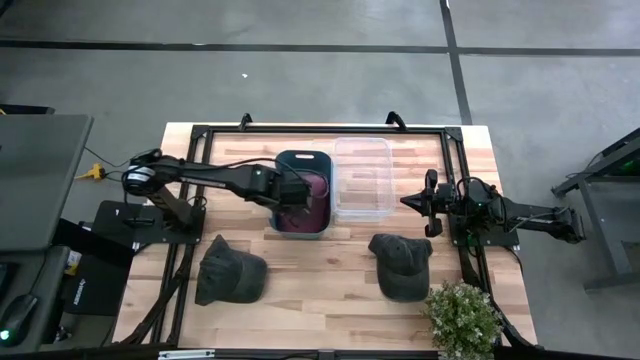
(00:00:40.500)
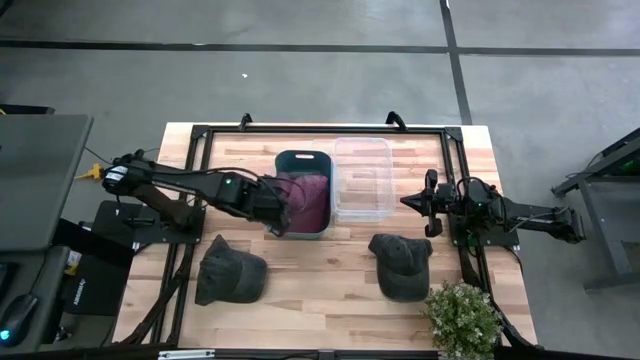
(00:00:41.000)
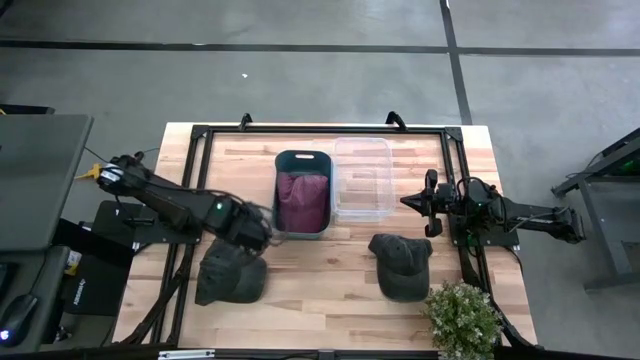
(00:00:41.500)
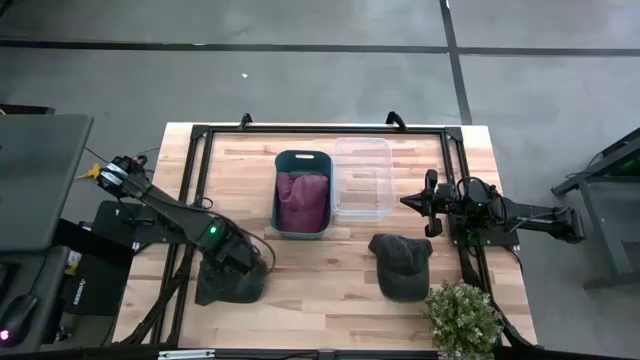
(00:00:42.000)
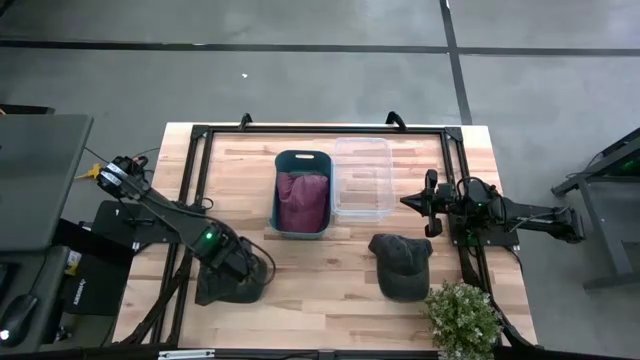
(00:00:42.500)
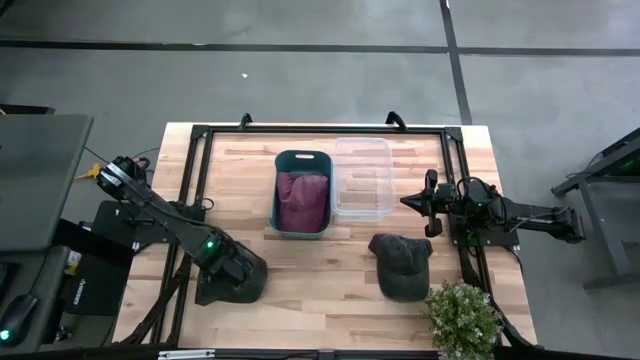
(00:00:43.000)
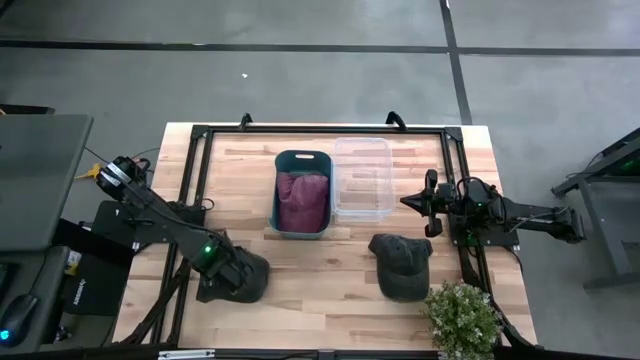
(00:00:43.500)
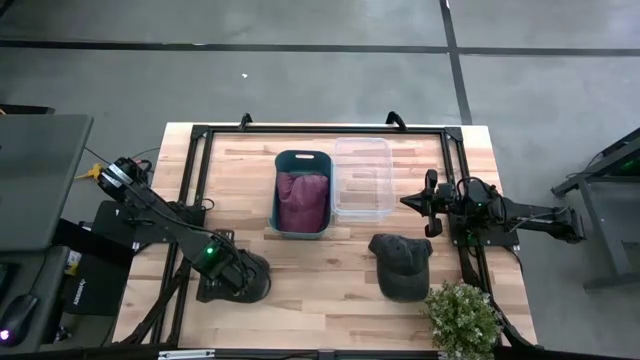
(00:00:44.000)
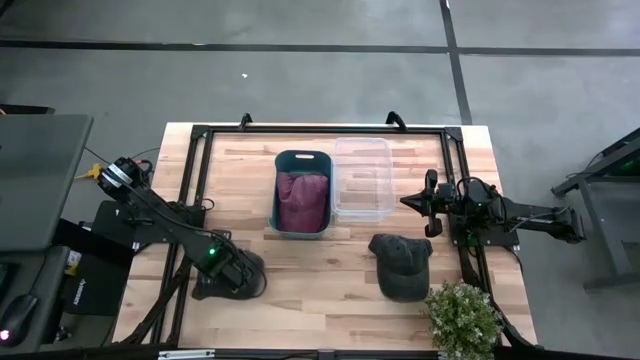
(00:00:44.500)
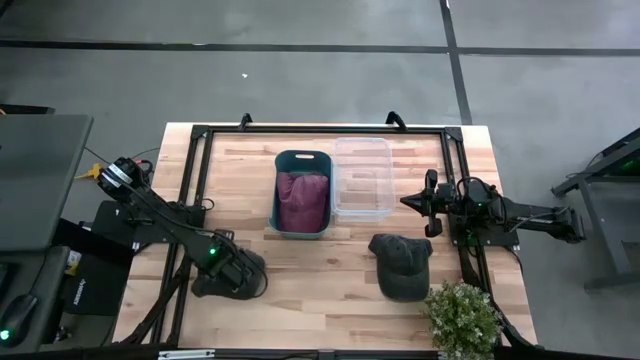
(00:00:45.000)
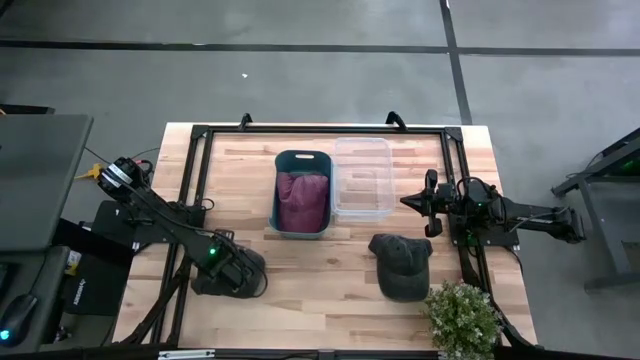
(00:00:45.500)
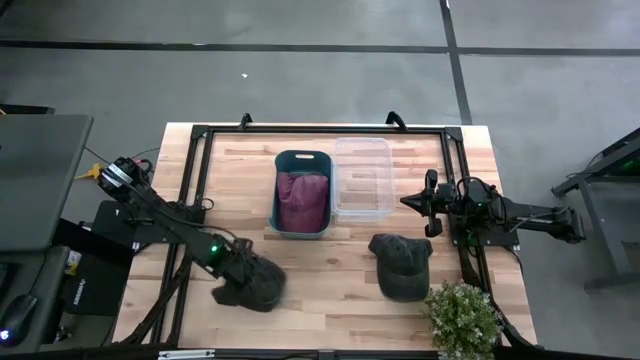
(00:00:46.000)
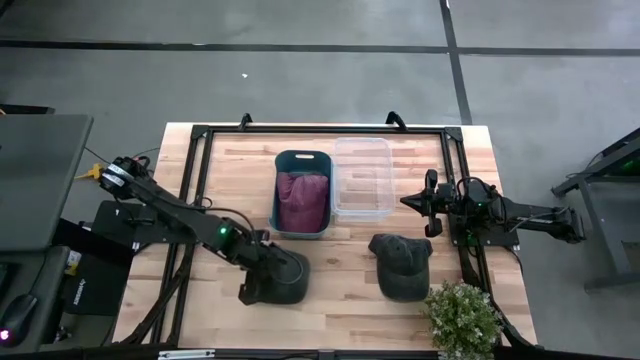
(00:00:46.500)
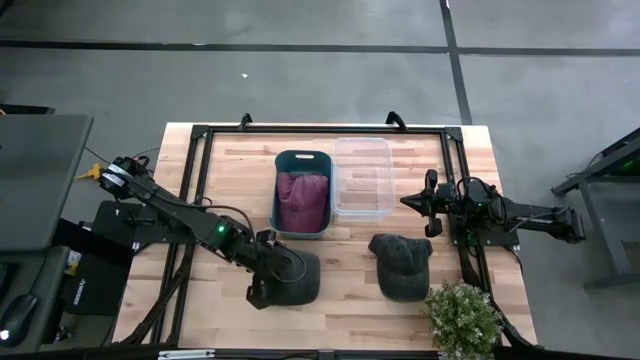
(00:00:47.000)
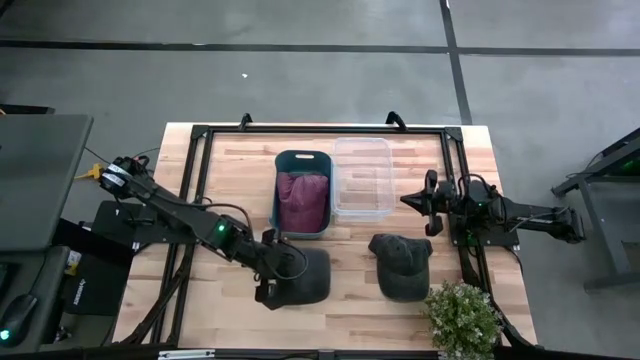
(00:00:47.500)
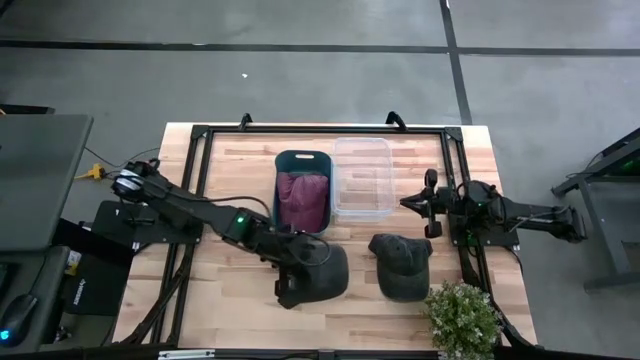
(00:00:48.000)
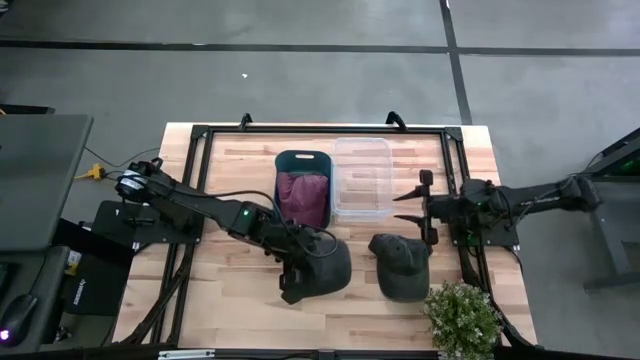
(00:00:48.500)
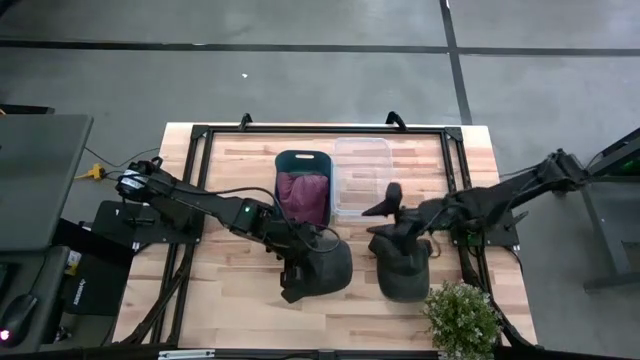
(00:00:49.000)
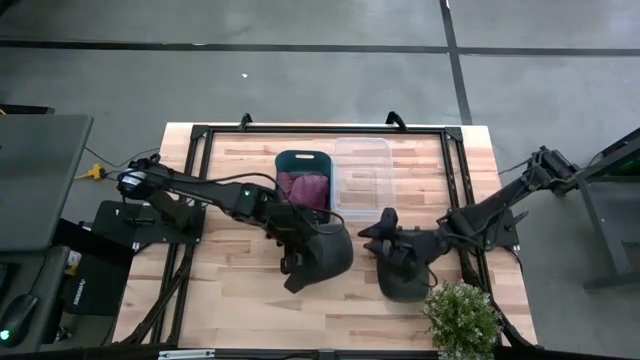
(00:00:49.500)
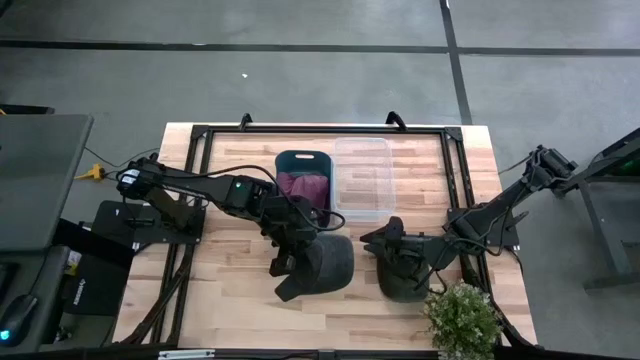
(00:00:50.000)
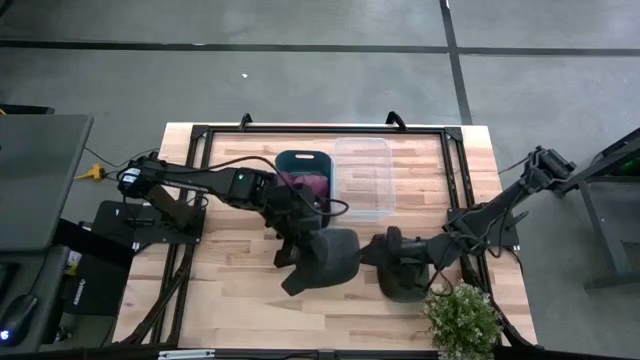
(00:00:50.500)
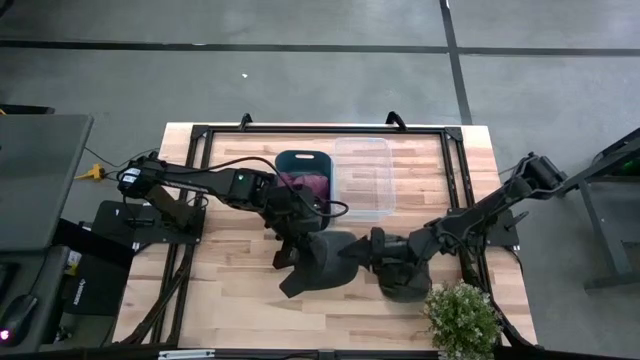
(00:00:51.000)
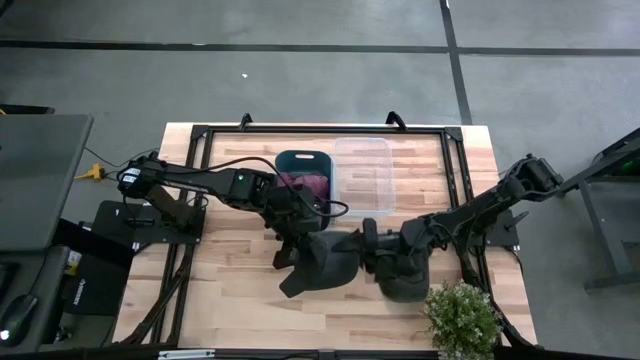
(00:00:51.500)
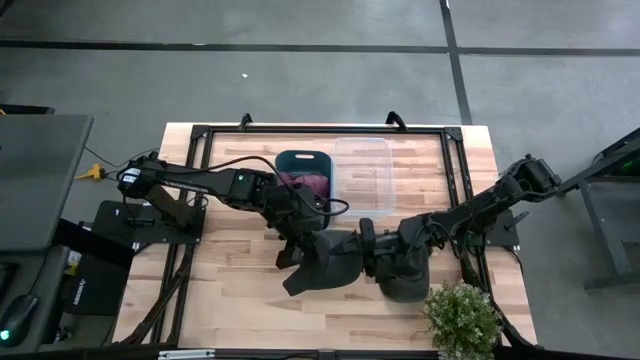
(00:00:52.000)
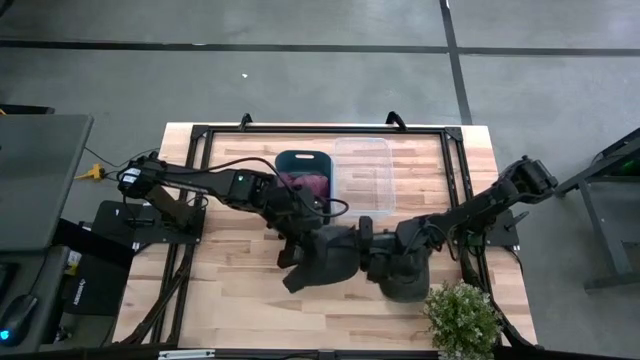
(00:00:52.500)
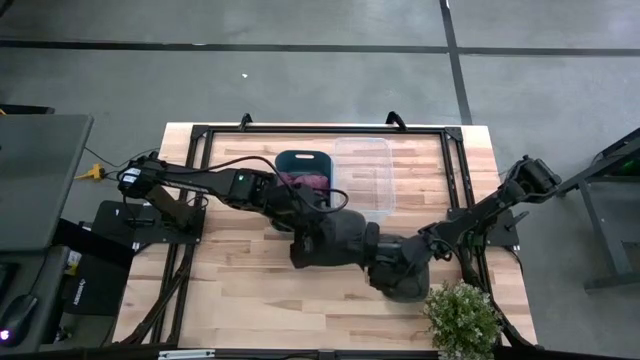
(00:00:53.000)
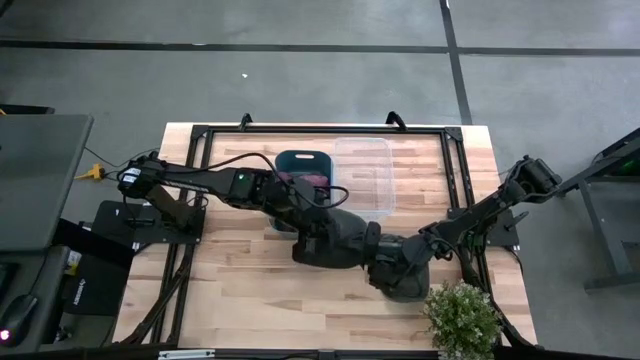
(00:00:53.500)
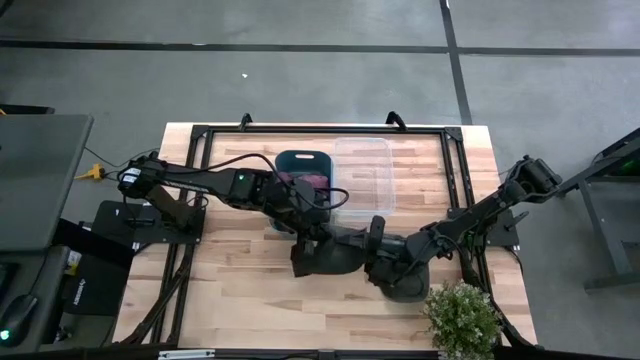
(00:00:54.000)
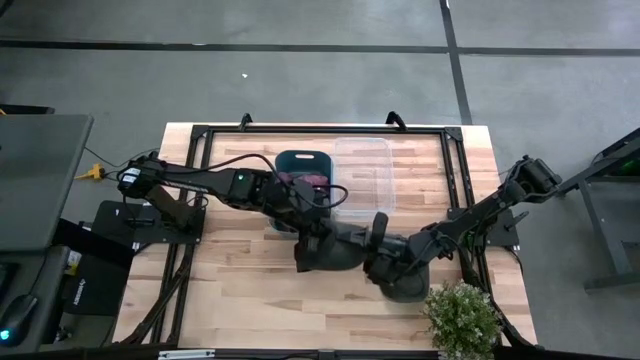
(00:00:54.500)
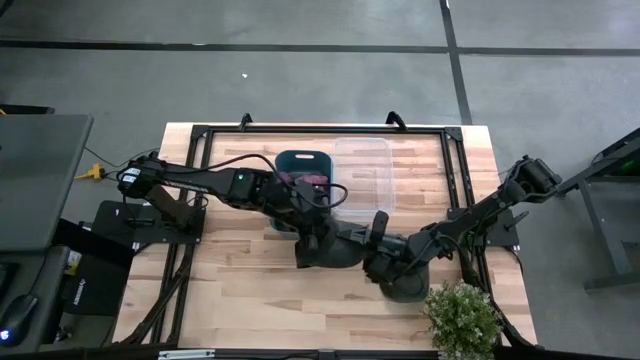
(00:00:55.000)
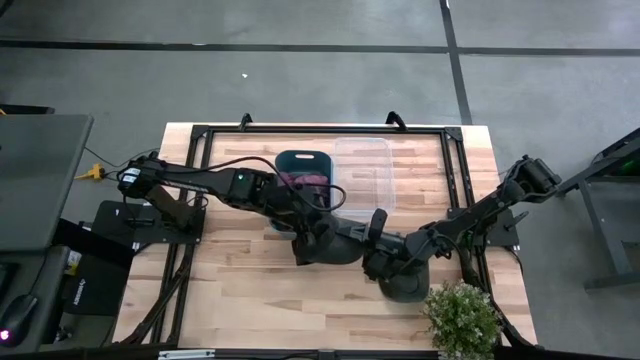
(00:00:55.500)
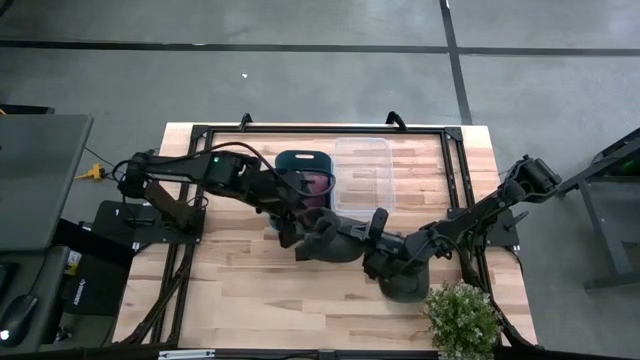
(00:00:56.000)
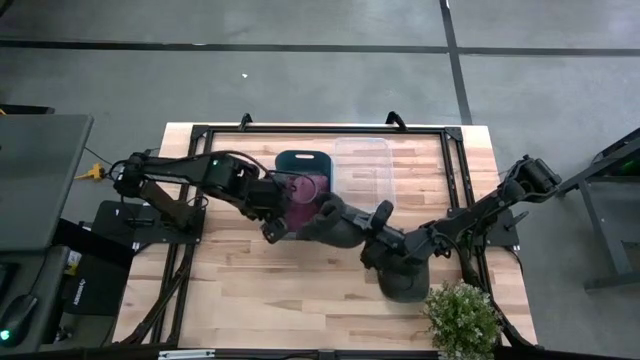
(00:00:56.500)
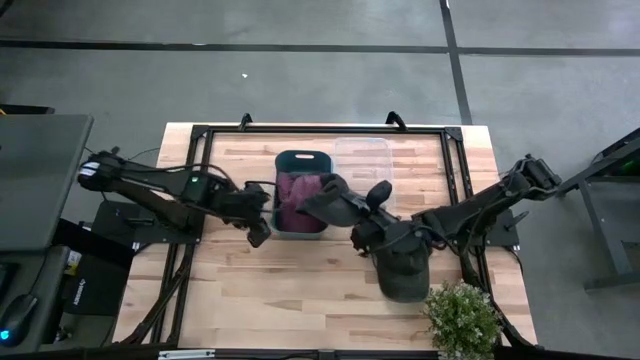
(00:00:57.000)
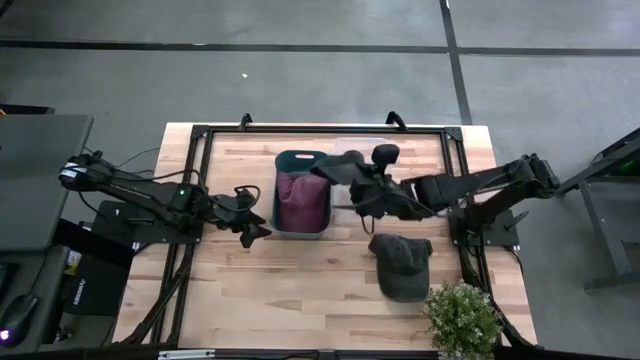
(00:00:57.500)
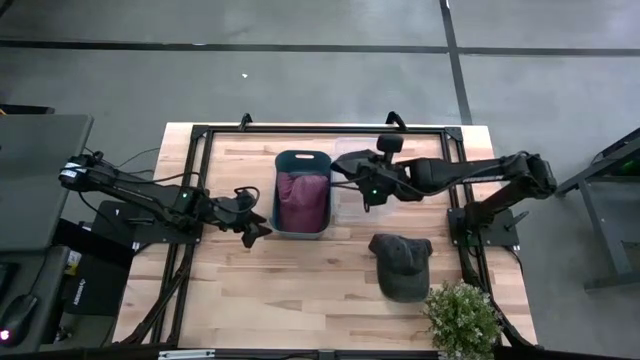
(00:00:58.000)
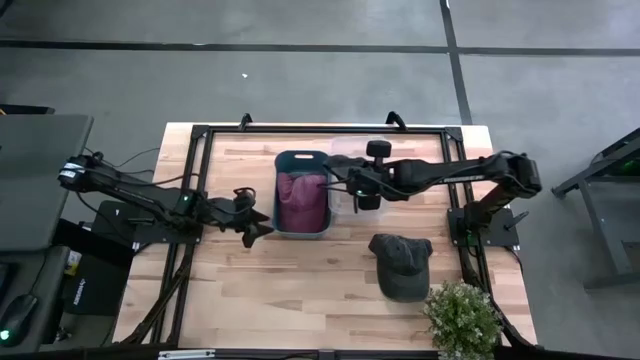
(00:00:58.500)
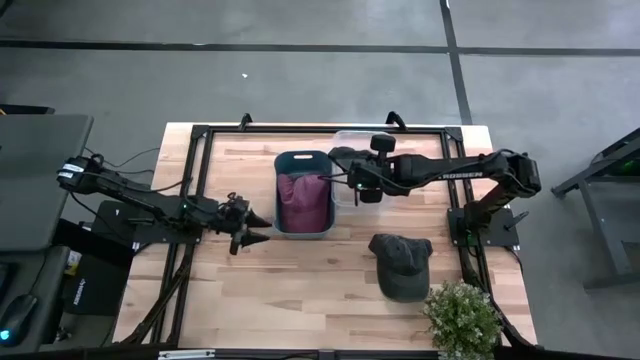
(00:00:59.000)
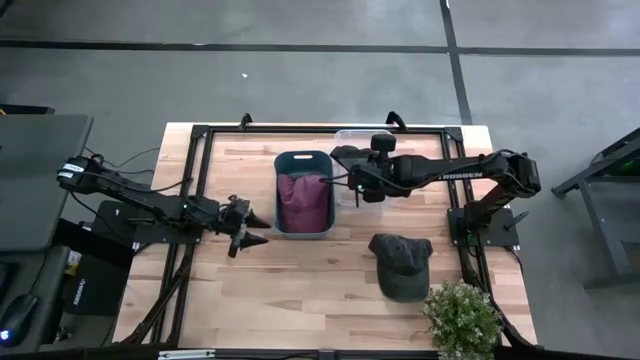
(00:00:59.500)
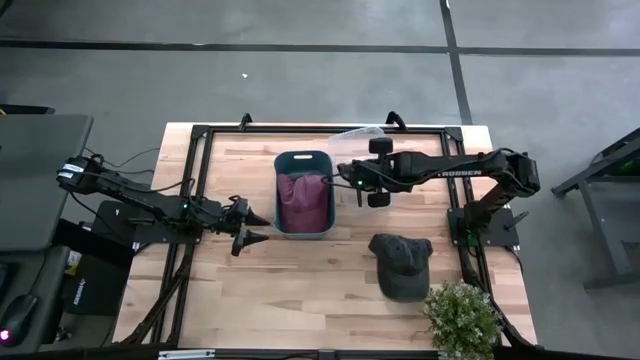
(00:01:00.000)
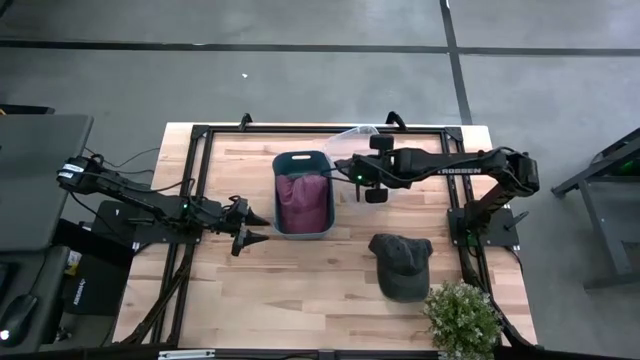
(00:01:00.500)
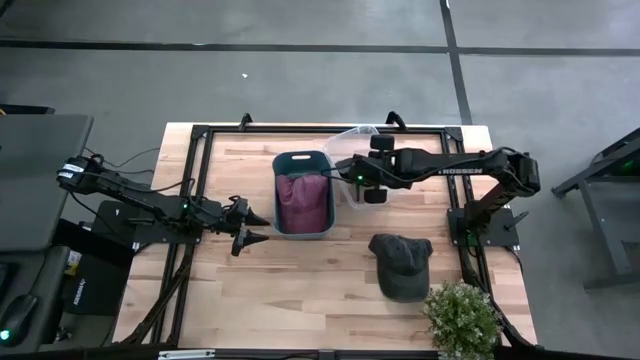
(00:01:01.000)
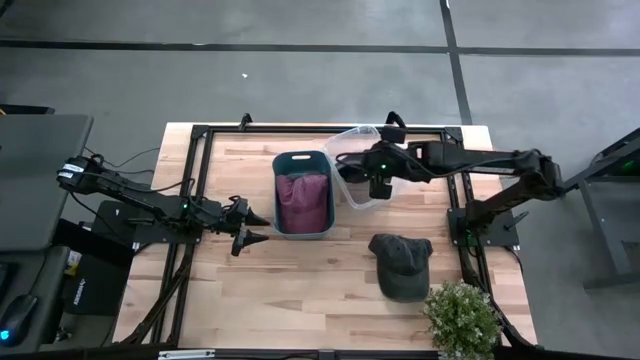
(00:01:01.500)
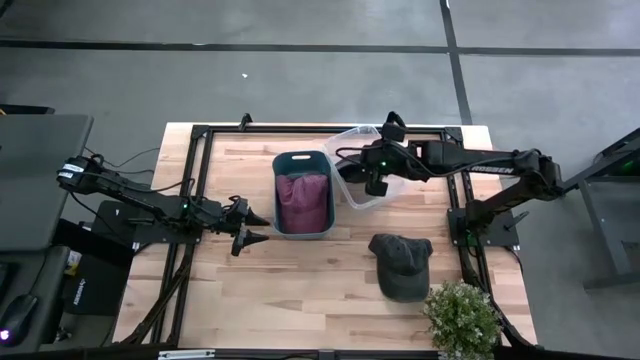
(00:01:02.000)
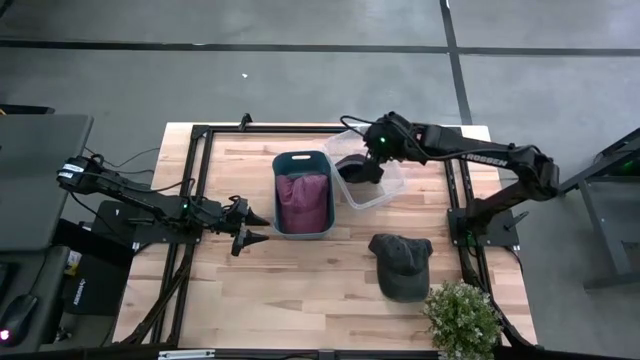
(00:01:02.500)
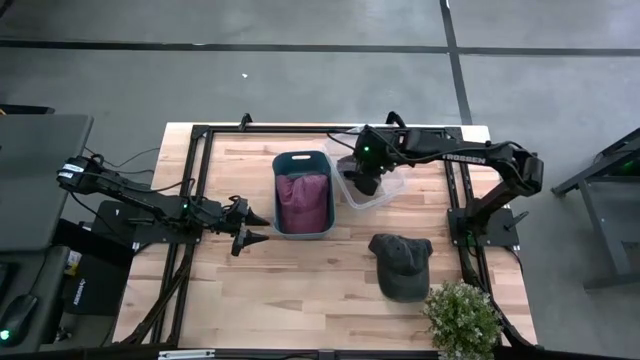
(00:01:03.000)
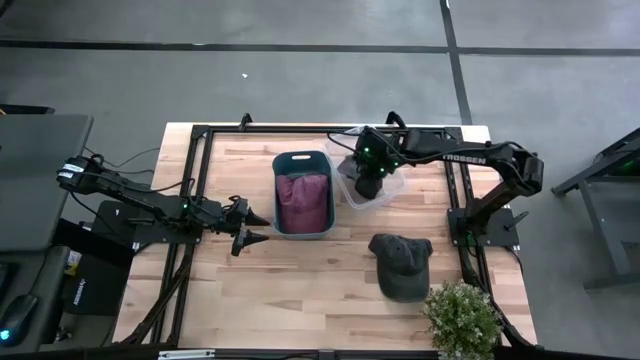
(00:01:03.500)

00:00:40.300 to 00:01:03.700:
Task: Pick & Place hat
Put the left black cap into the transparent bin
